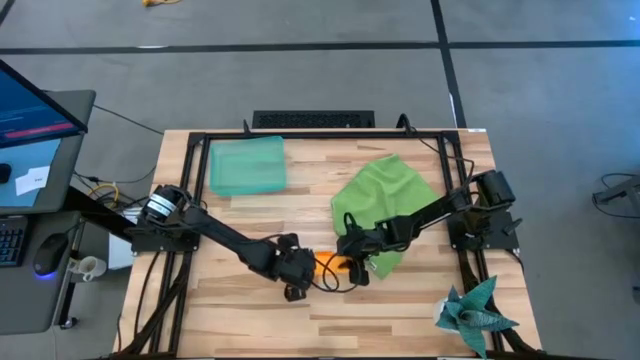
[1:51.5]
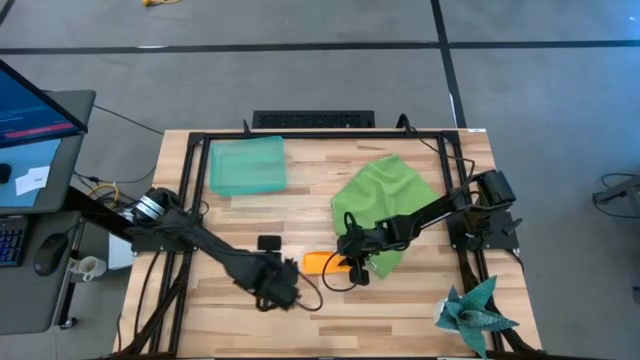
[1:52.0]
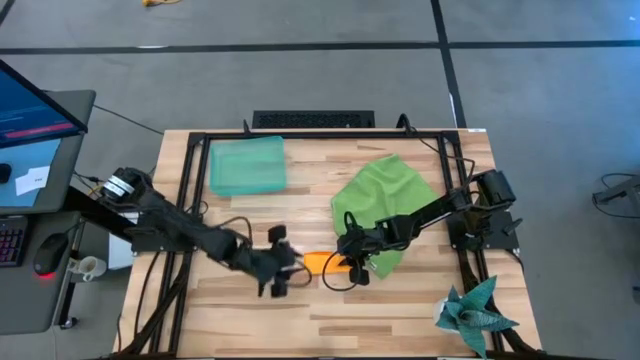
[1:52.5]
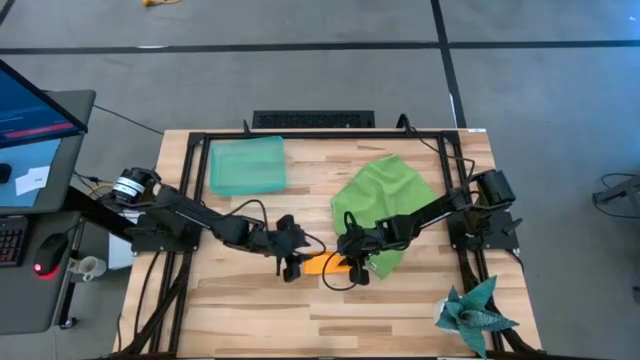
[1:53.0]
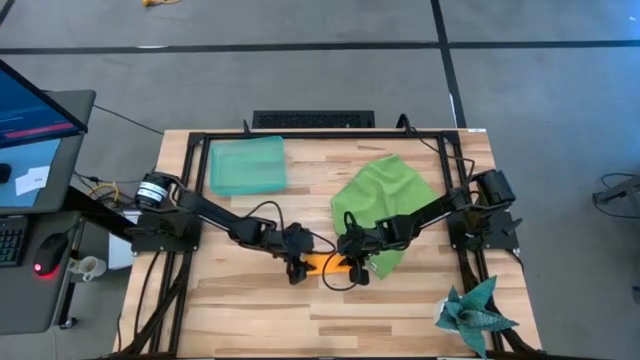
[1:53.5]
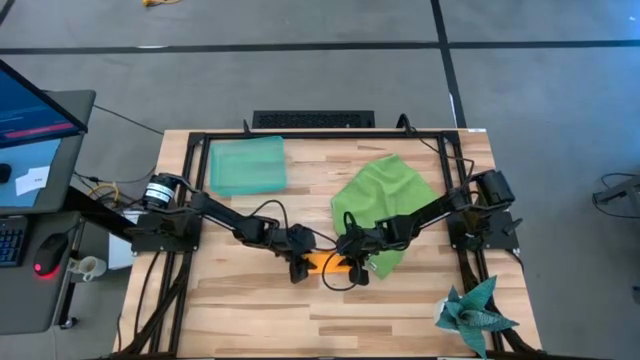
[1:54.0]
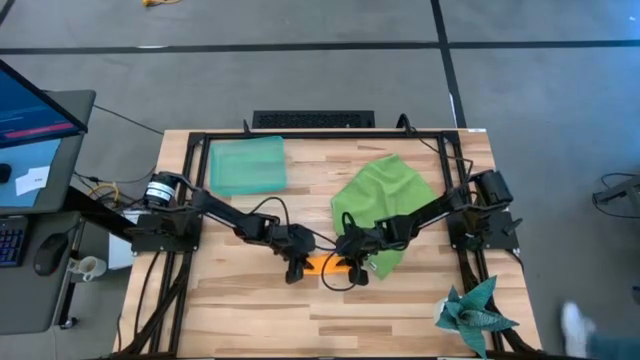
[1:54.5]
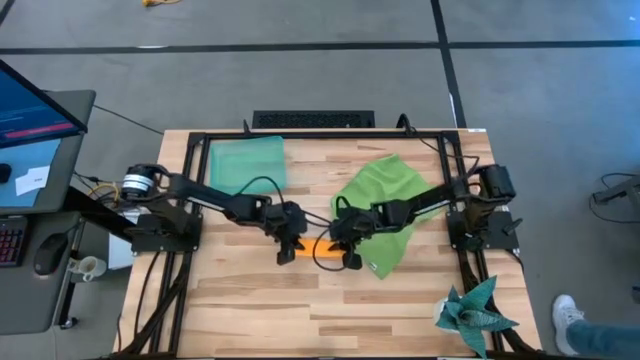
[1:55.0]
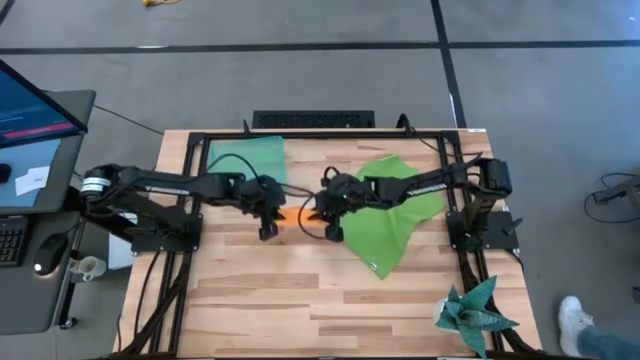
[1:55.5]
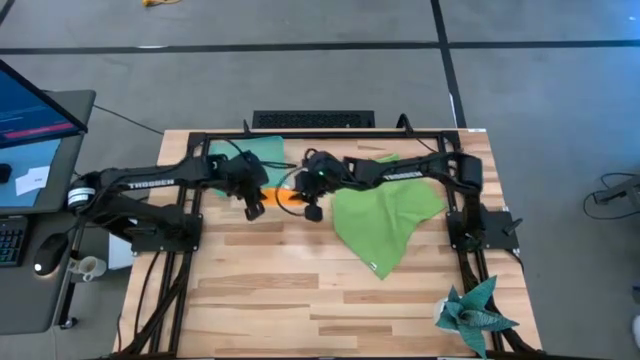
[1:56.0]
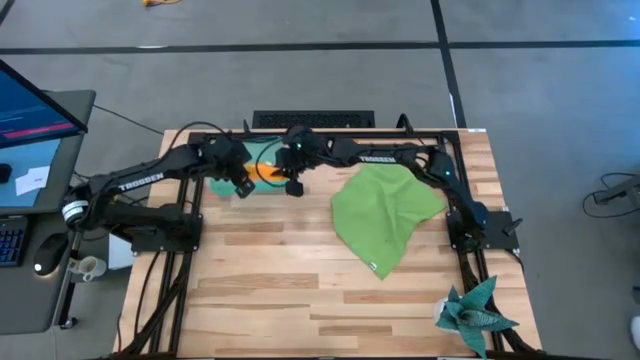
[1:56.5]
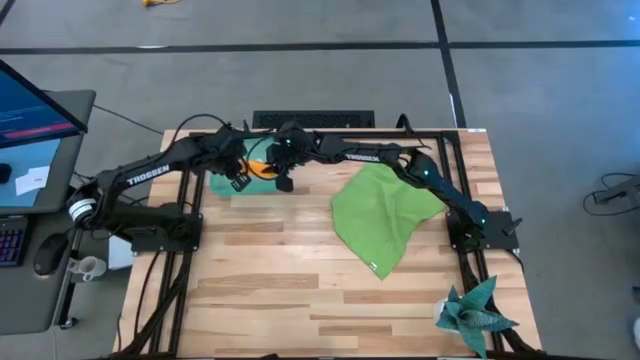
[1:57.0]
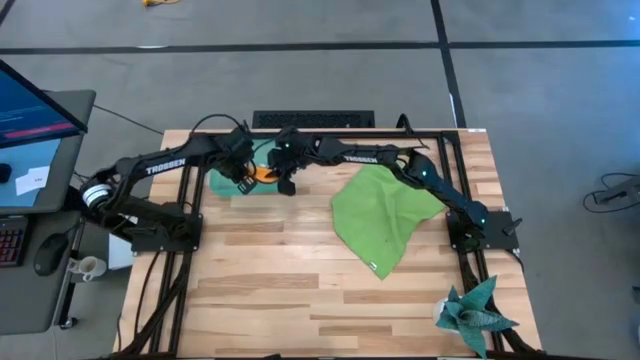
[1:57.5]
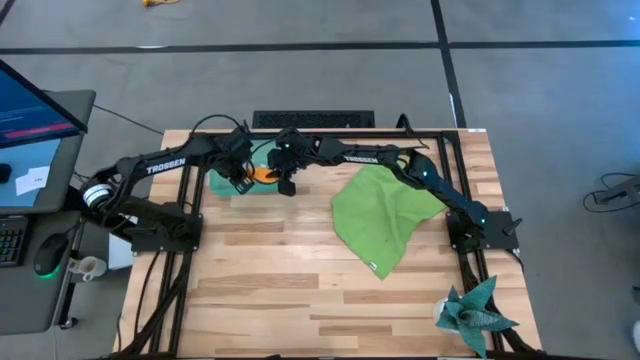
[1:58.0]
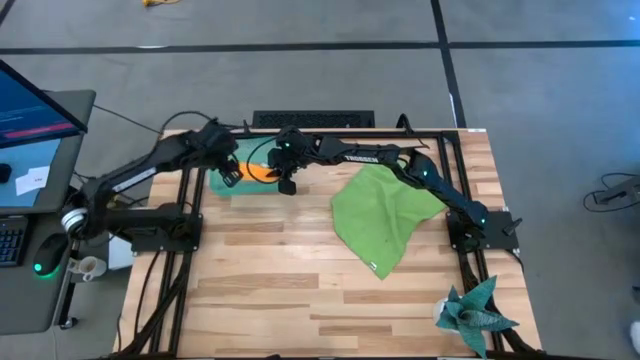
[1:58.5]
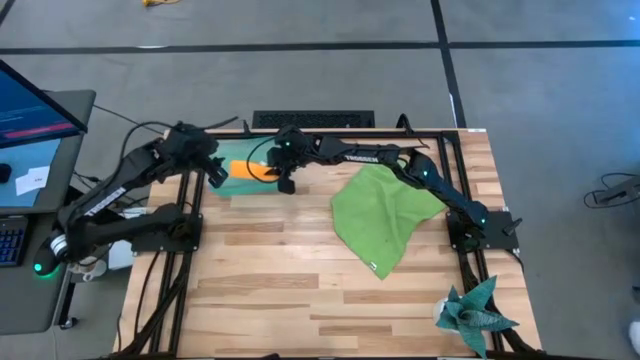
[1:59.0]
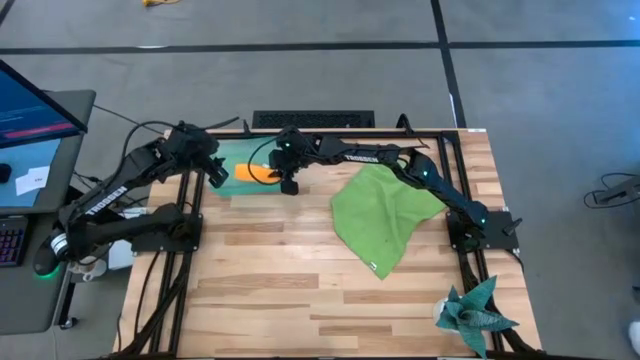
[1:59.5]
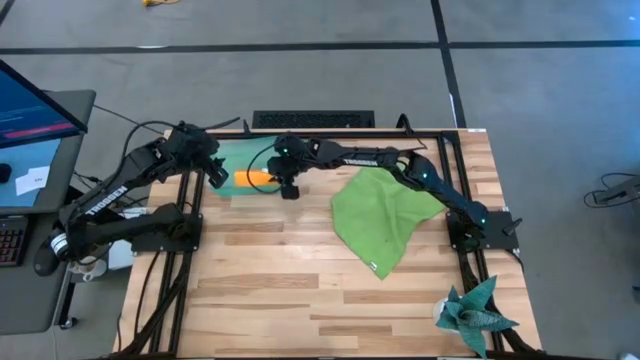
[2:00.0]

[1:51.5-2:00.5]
Task: Roll microfiber towels into tight, uniform cylinder then place into a basket
Put the rolled yellow microfiber cloth into the bin

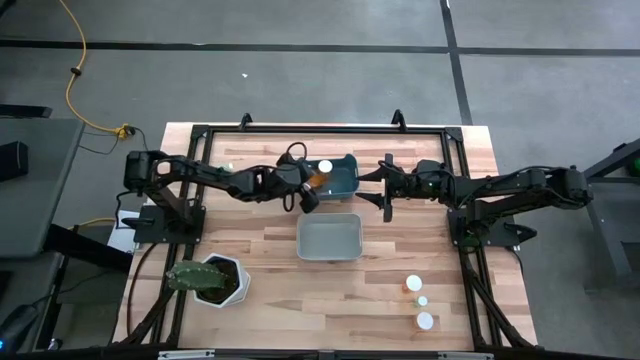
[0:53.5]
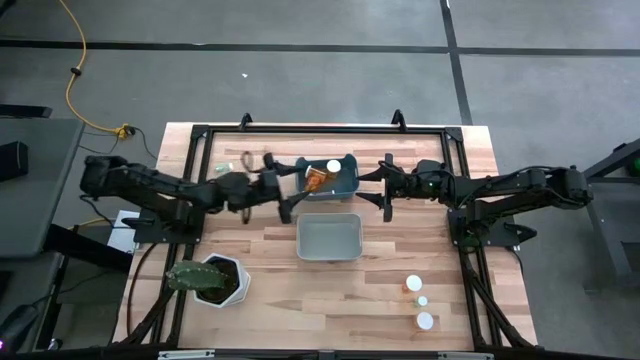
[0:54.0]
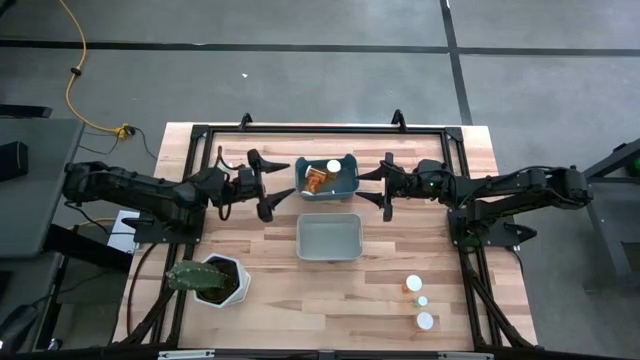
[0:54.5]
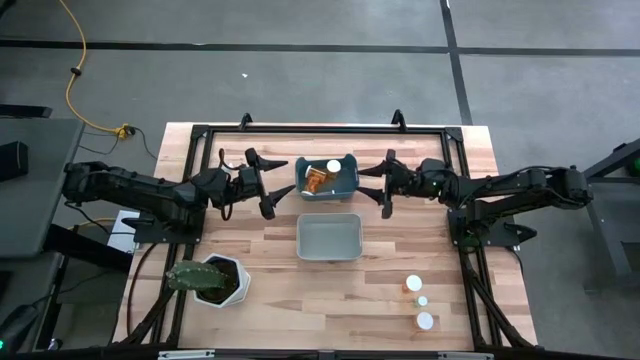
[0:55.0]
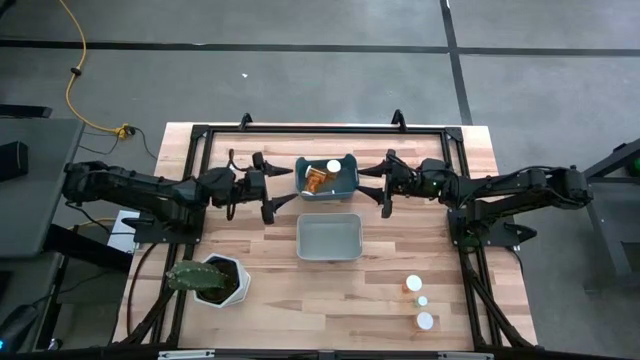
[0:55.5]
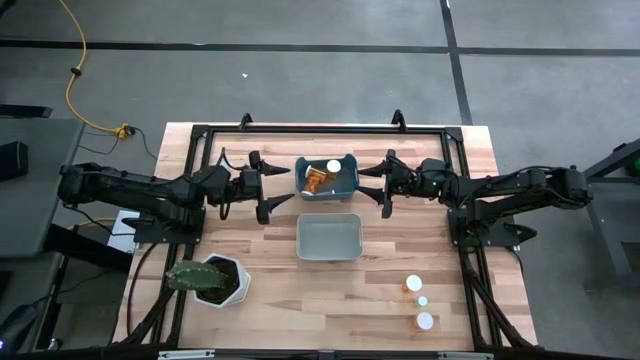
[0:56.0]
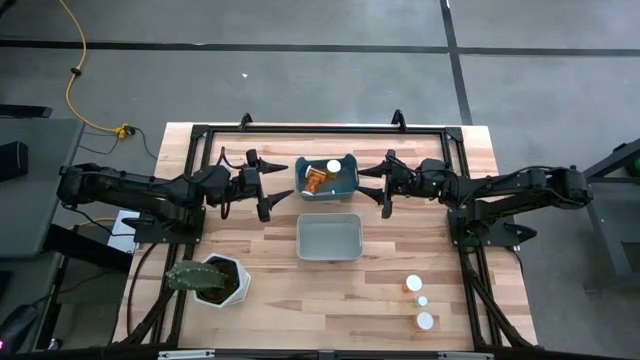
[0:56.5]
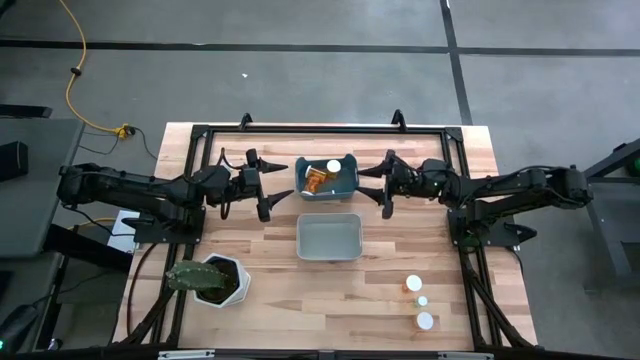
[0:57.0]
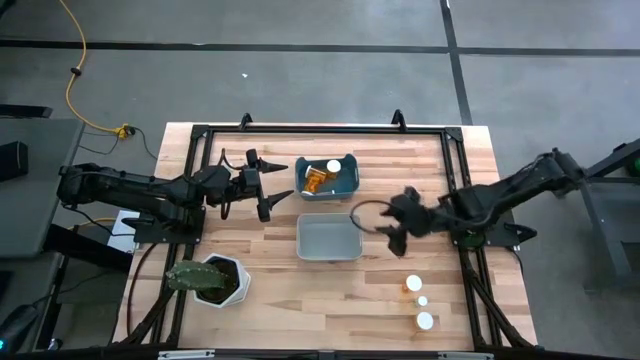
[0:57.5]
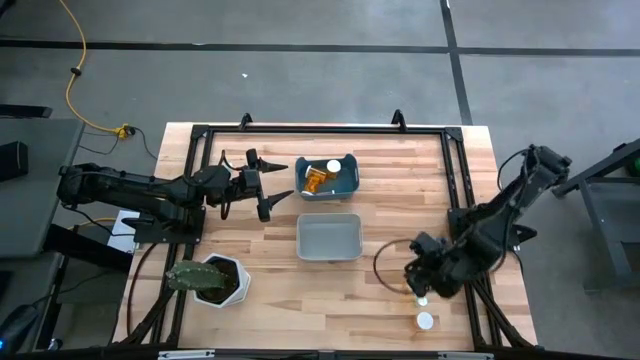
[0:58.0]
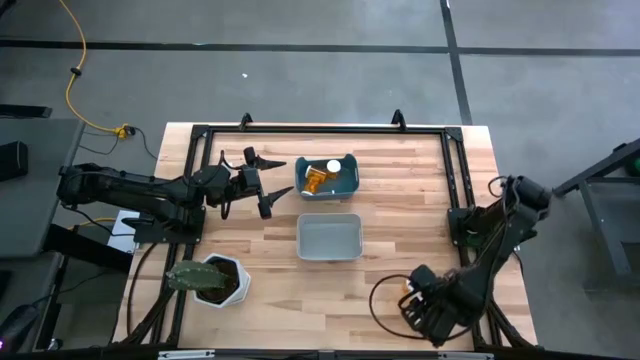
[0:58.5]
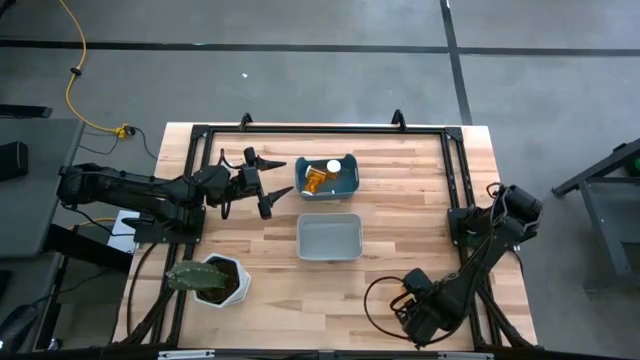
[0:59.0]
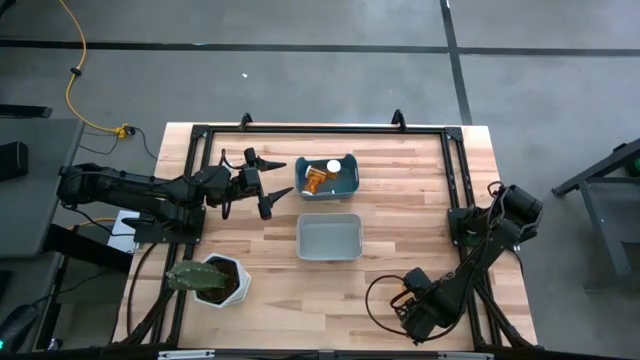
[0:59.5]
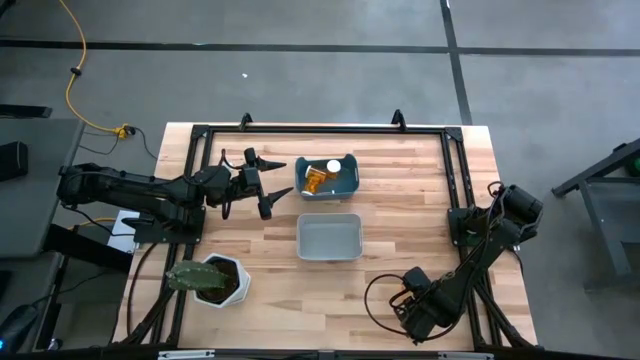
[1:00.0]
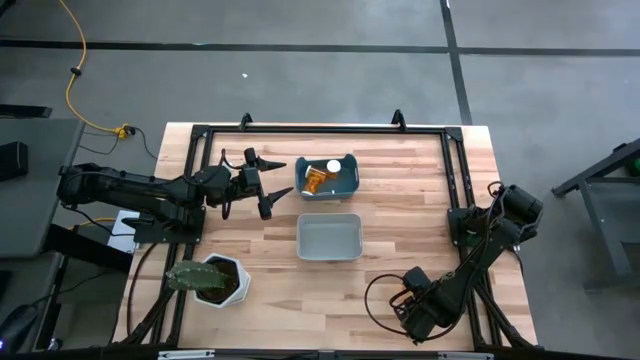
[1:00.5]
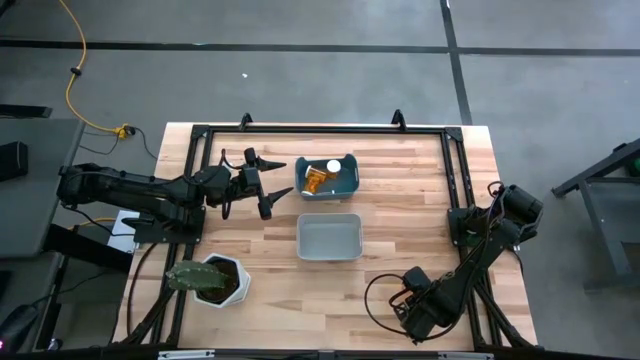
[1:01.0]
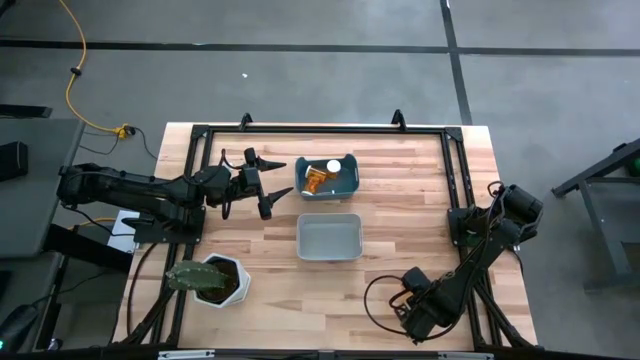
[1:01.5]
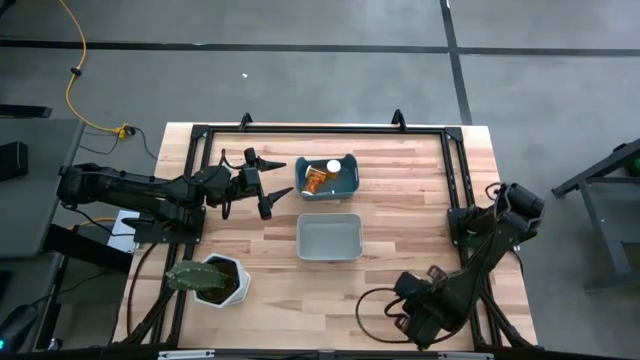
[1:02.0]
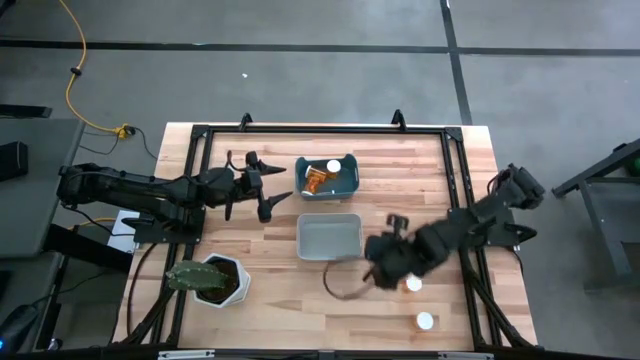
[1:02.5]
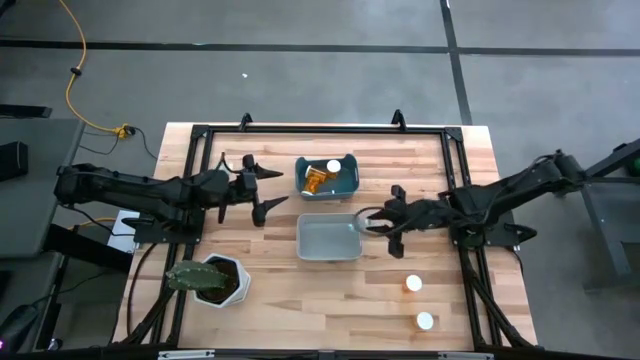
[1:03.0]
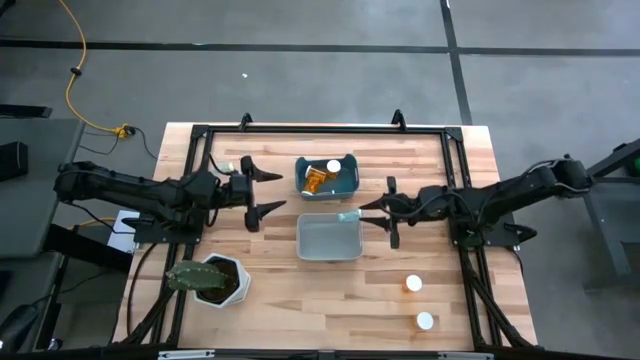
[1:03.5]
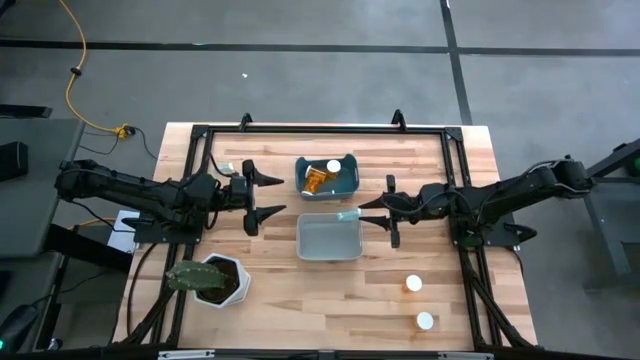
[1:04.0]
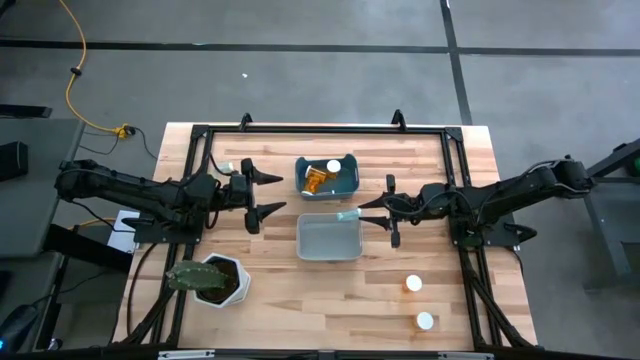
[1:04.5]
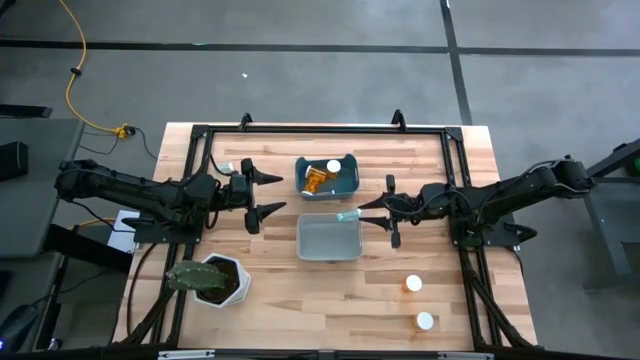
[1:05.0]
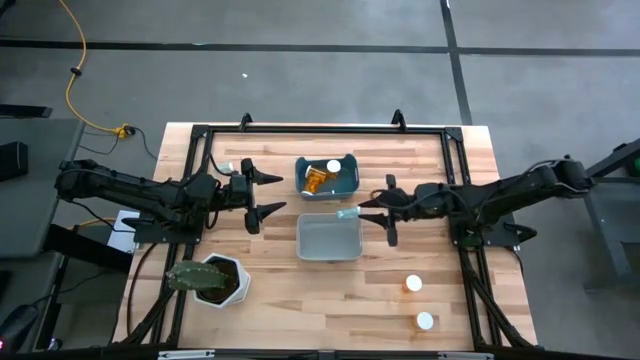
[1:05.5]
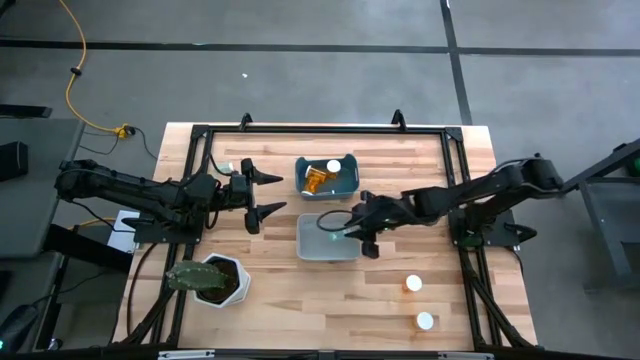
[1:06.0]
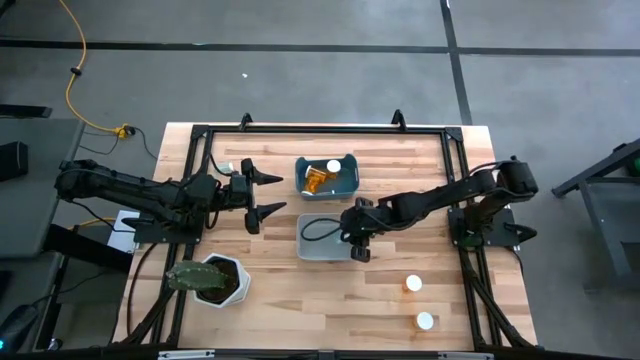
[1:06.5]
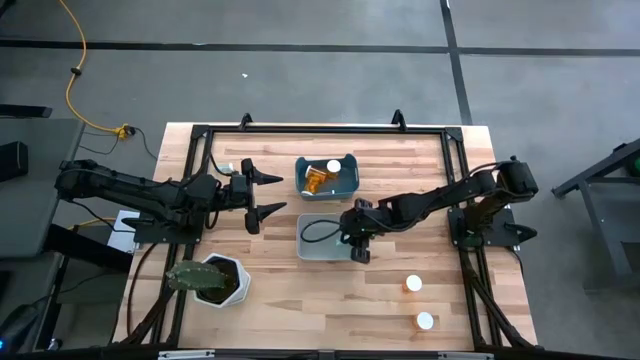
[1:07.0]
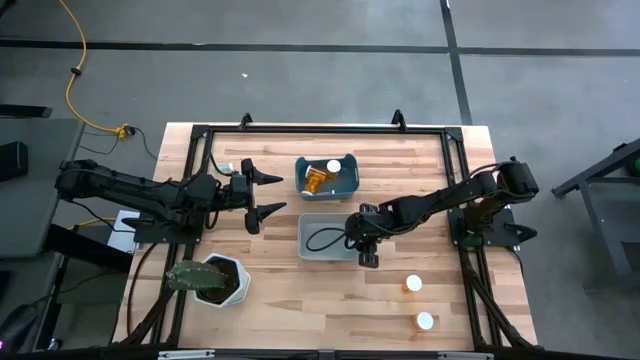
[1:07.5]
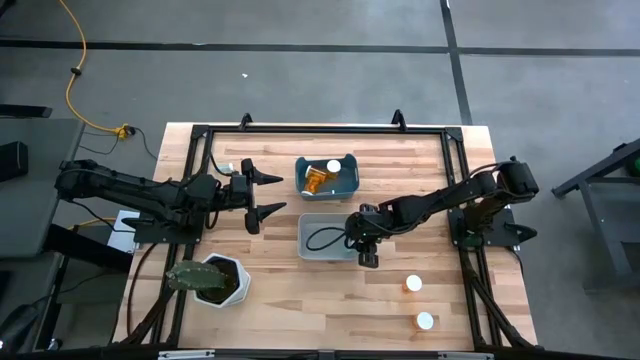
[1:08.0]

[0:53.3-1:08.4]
Task: Pick and place medicine bottles into bin by pill shape (circle, oval)
Put the green tablet bottle into the gray bin
